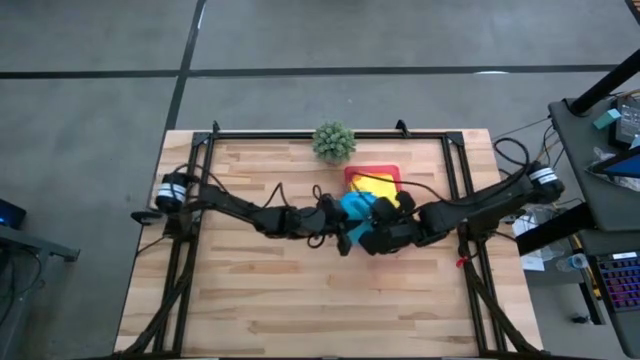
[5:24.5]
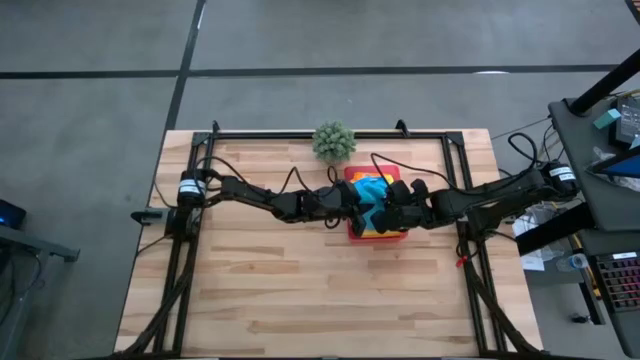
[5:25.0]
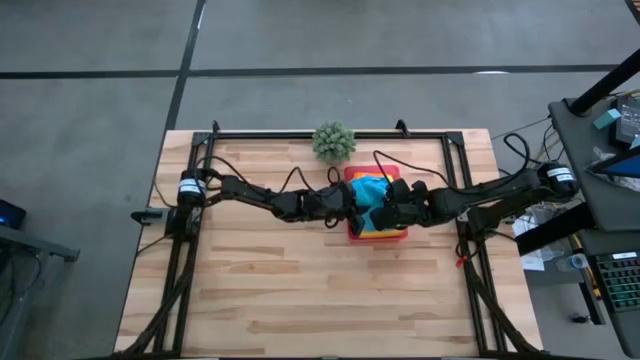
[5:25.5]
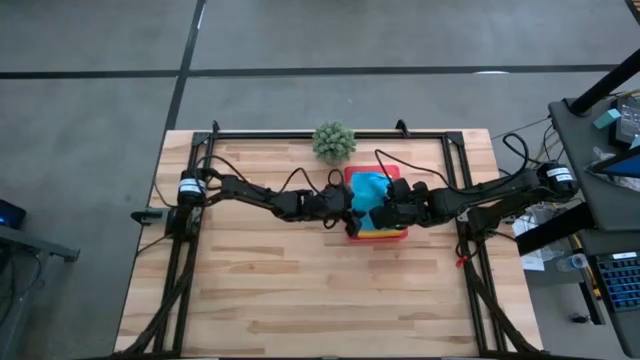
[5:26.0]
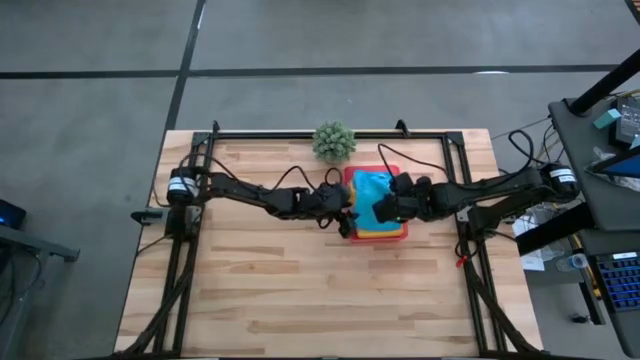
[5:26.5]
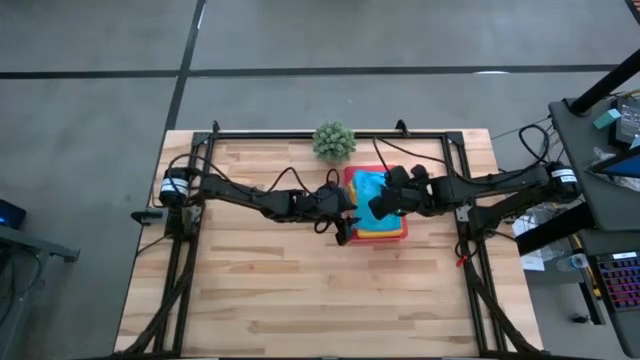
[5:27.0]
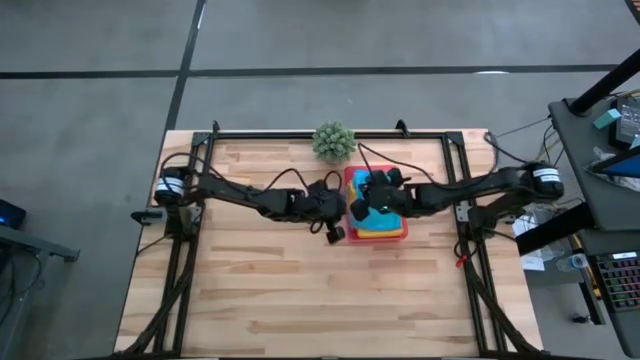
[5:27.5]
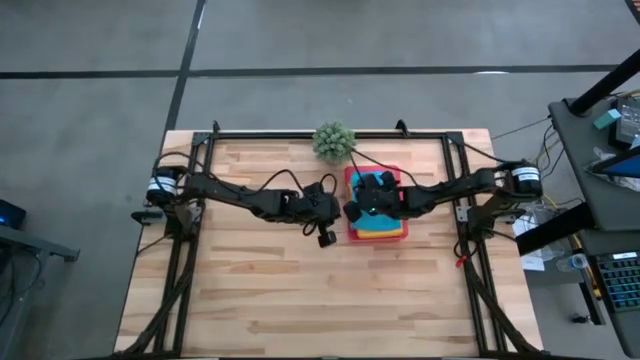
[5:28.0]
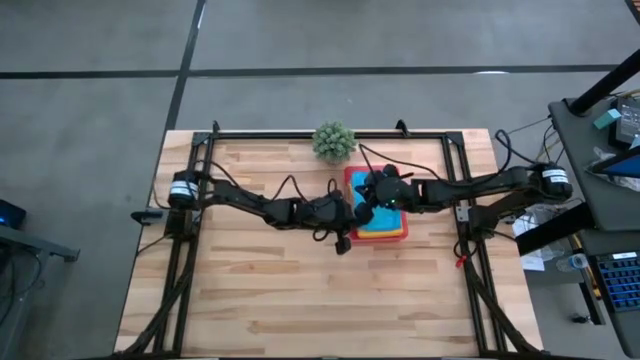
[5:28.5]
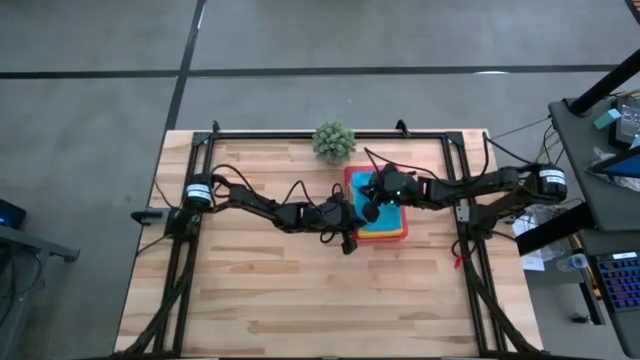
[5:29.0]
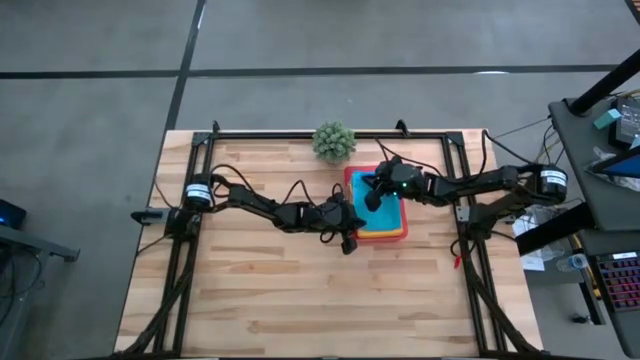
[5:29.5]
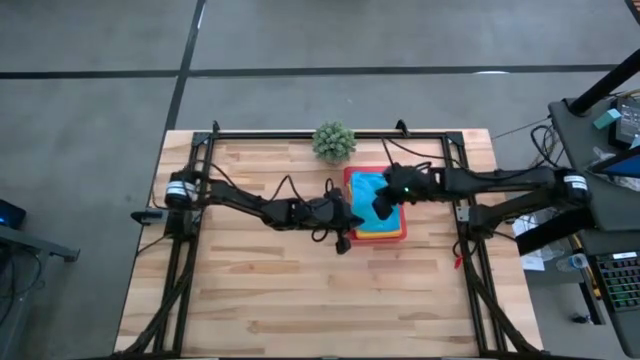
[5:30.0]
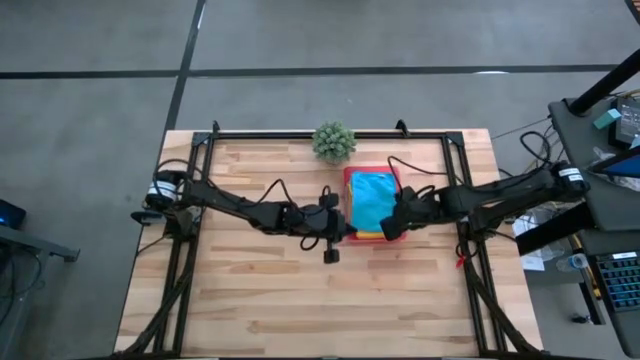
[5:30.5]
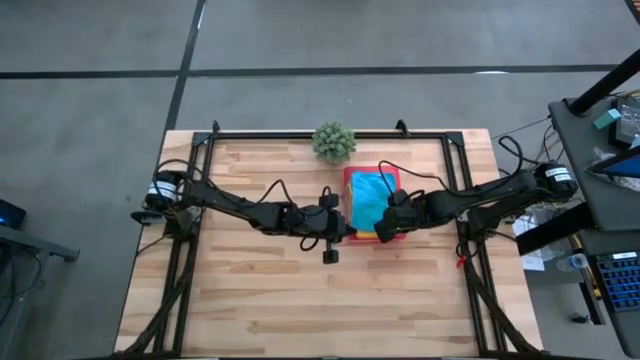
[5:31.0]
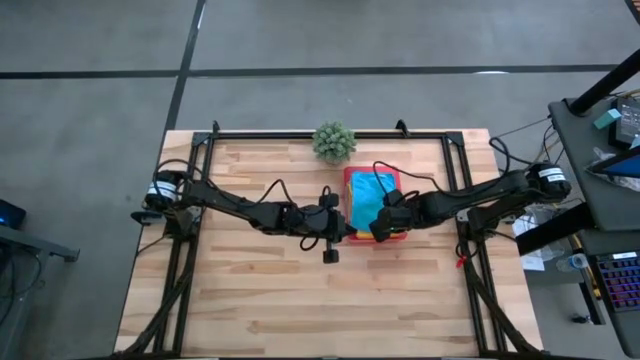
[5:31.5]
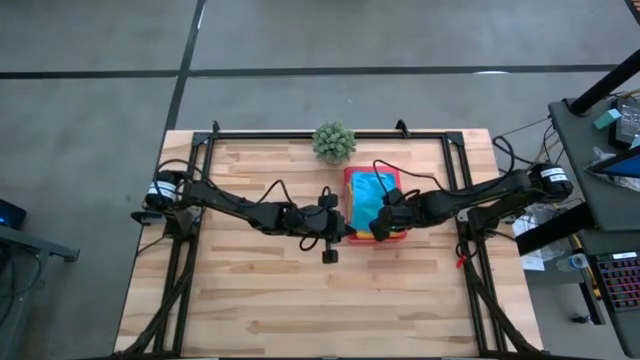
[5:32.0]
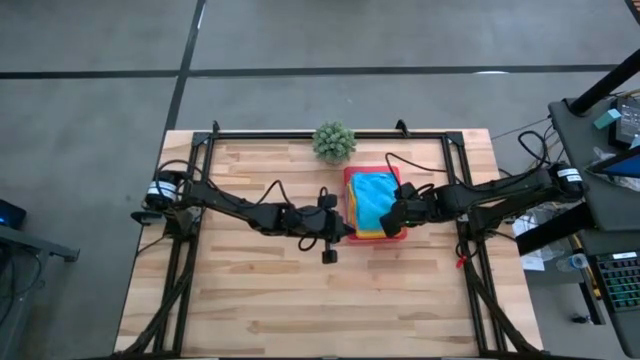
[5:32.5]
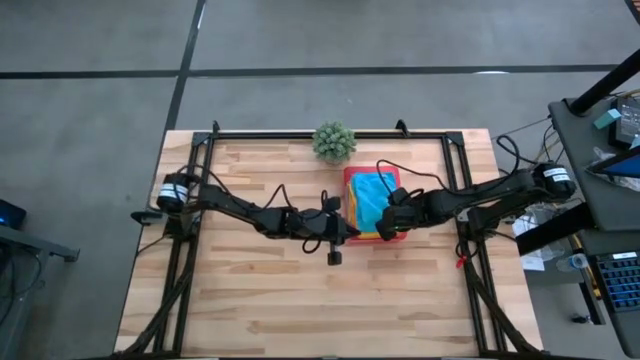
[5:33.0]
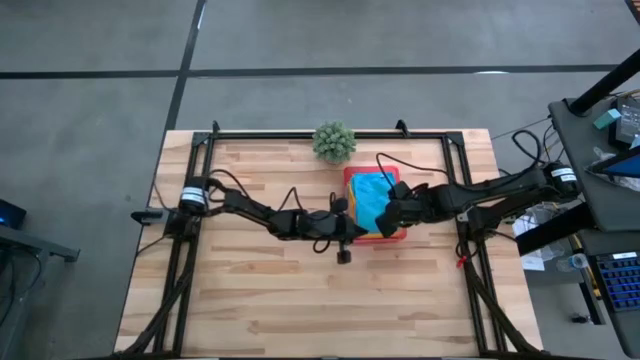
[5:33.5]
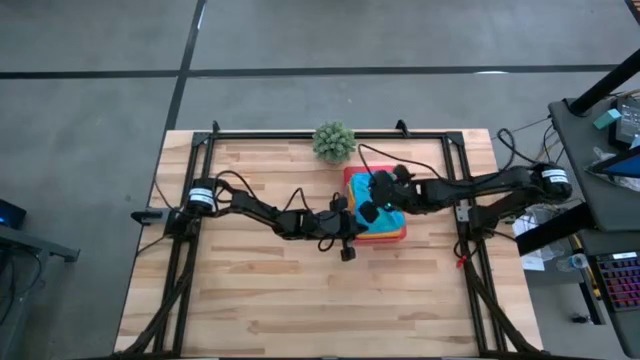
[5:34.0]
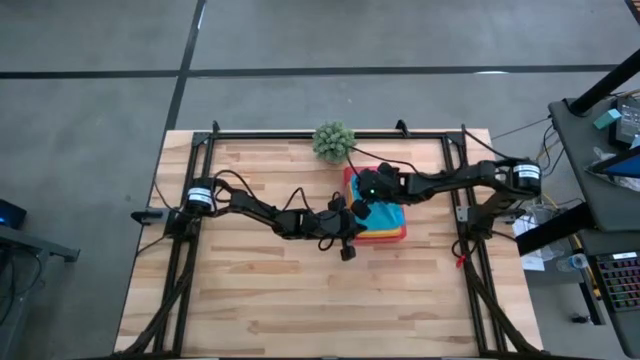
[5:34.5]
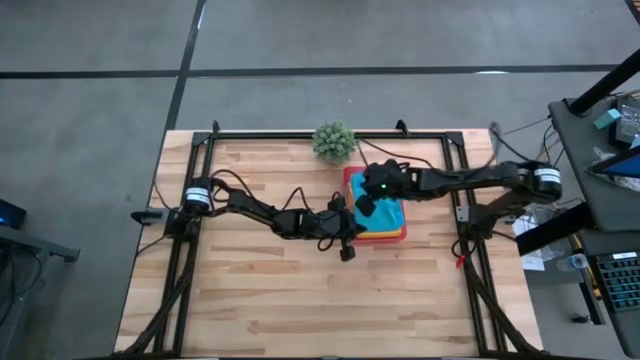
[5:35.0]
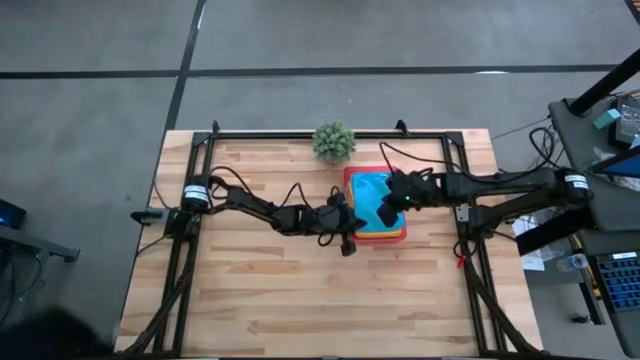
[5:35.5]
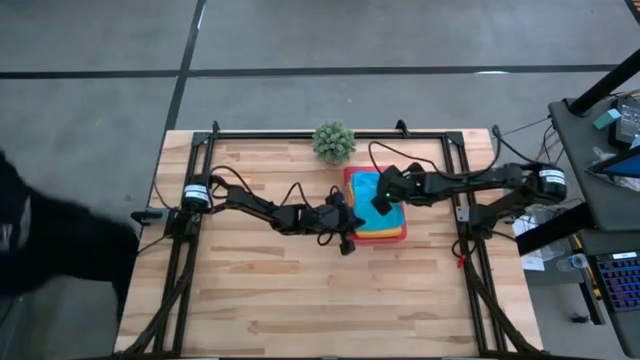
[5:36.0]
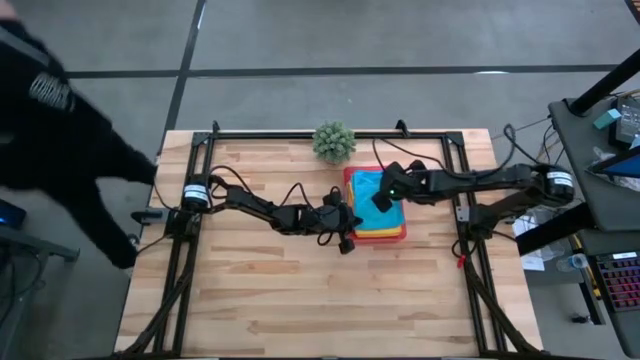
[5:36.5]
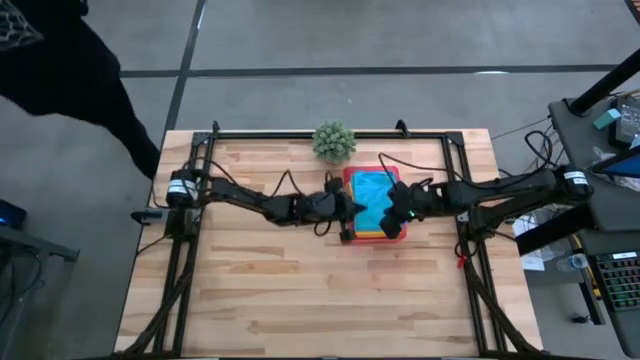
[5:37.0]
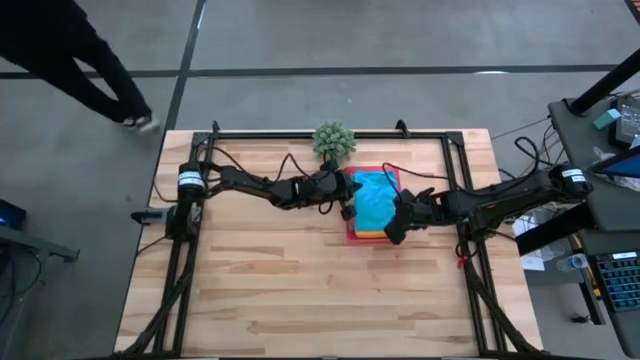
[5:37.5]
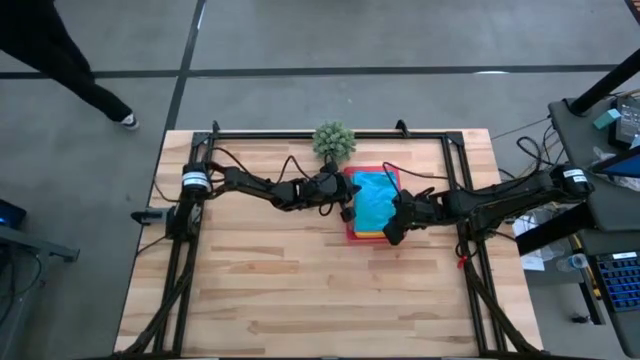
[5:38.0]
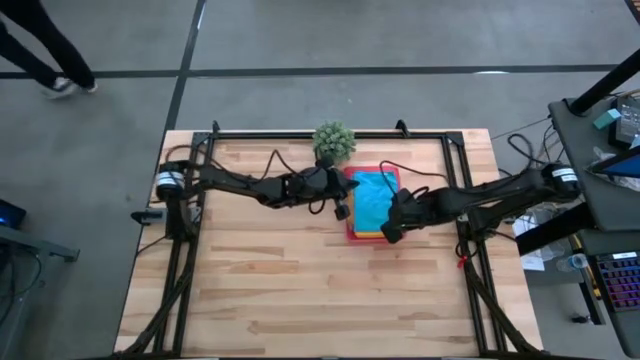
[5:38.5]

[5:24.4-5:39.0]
Task: Fold microfiber towels
Put the blue towel into the red bin

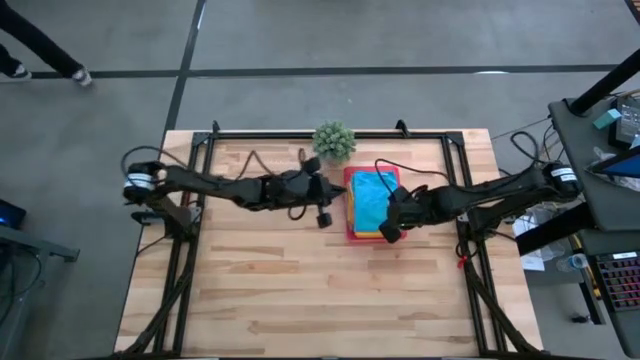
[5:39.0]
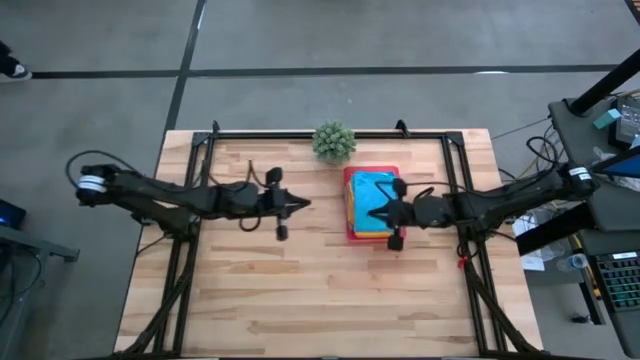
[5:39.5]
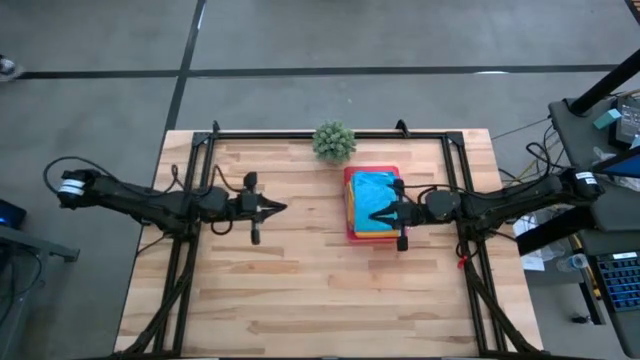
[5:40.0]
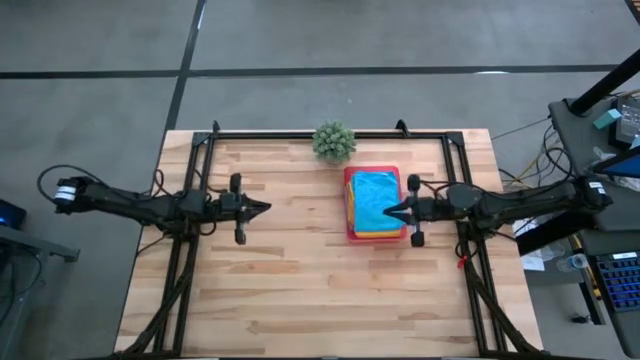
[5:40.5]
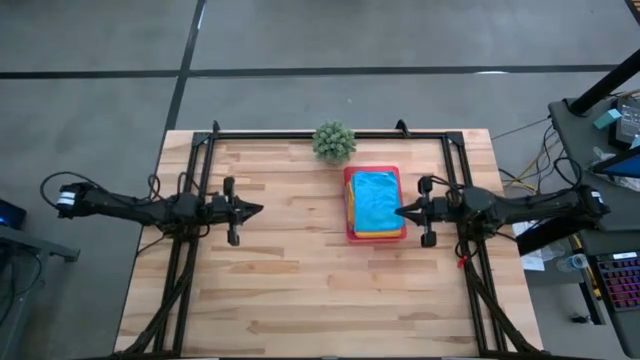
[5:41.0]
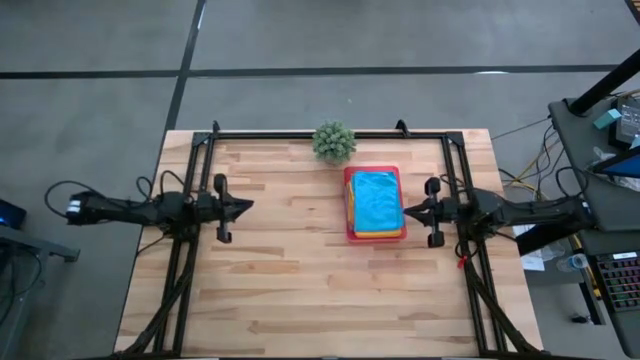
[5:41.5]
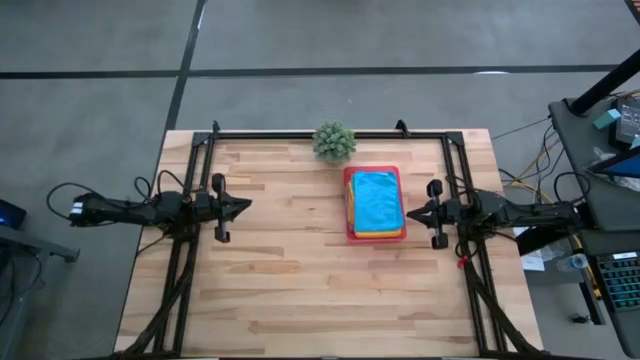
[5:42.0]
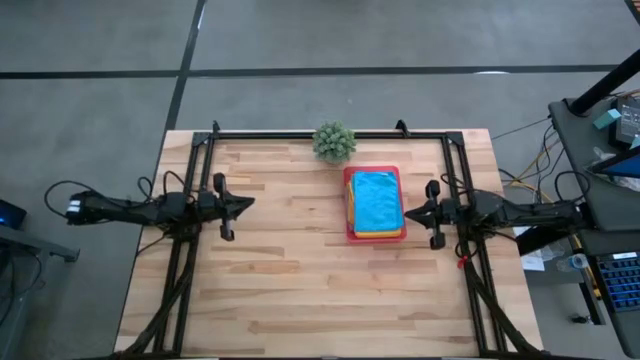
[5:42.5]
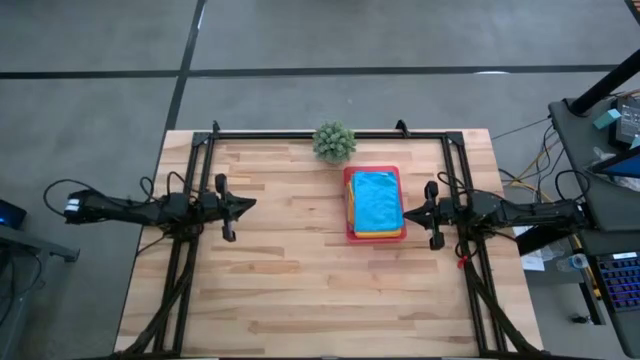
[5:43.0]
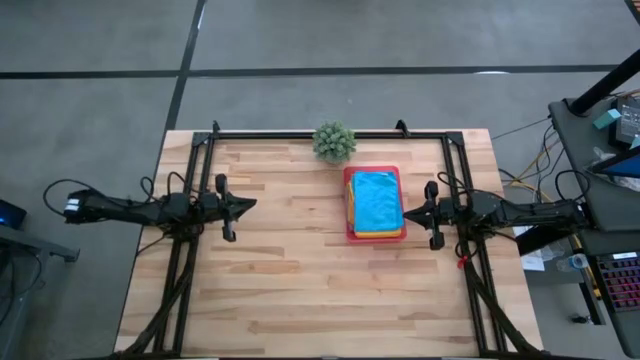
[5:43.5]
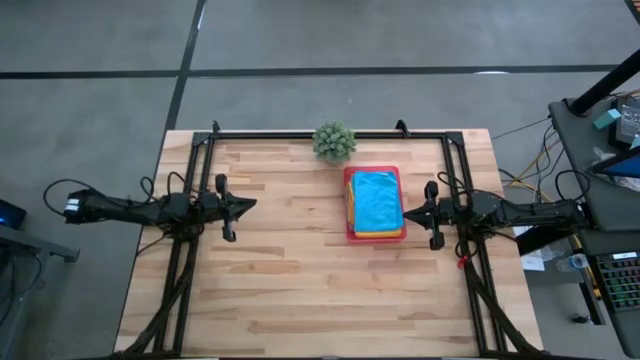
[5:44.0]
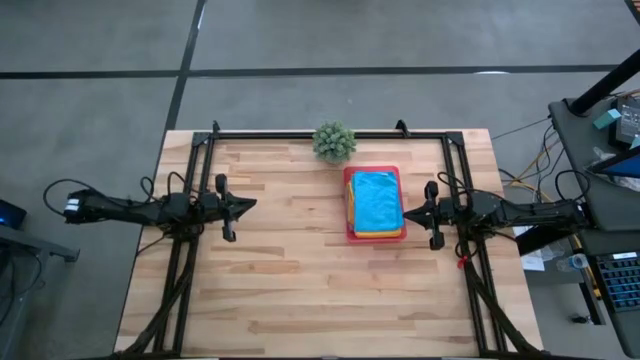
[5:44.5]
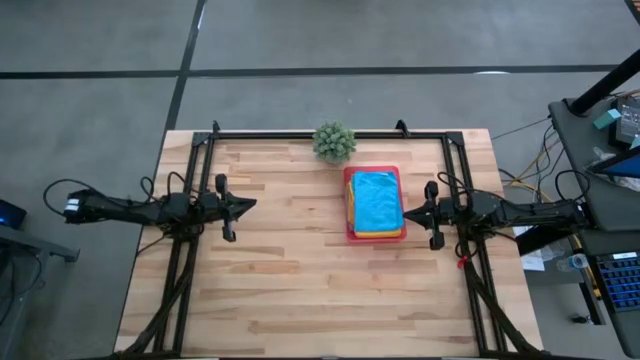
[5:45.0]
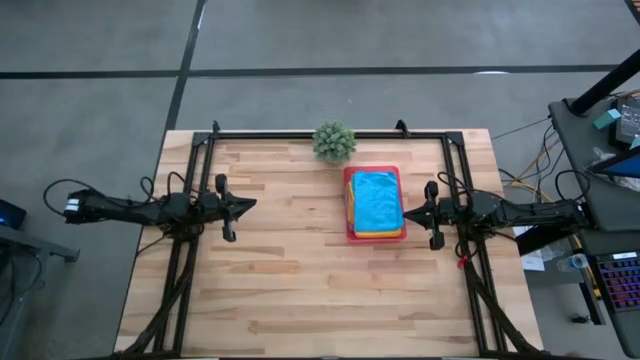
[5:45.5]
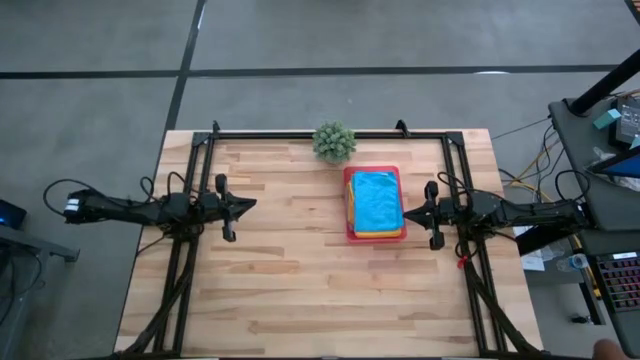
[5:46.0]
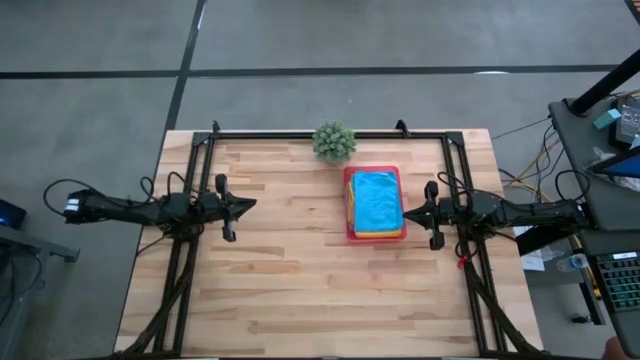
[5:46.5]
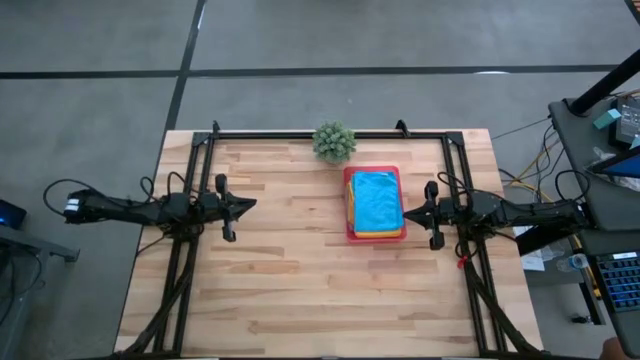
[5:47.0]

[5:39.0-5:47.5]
Return to Home Position
